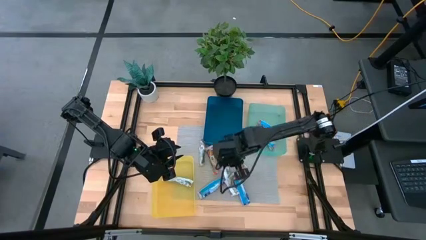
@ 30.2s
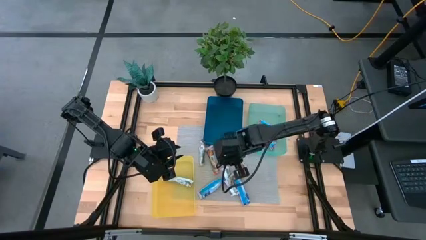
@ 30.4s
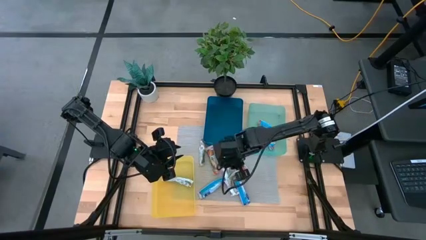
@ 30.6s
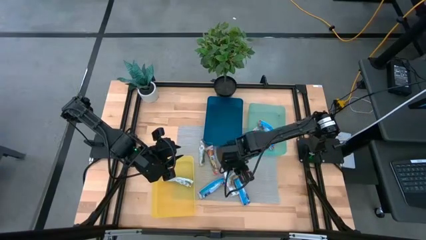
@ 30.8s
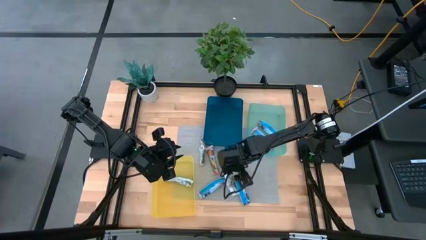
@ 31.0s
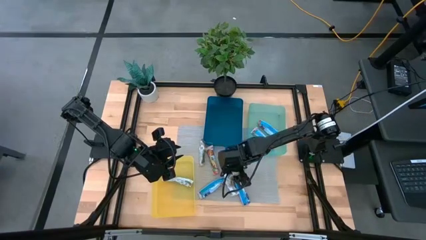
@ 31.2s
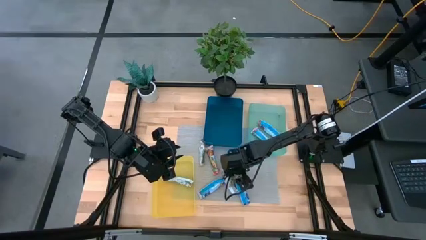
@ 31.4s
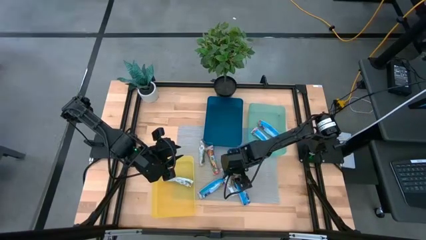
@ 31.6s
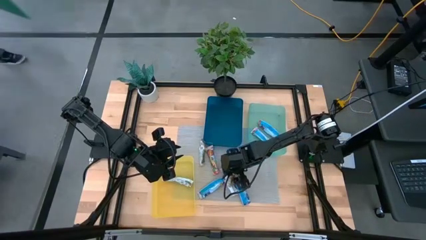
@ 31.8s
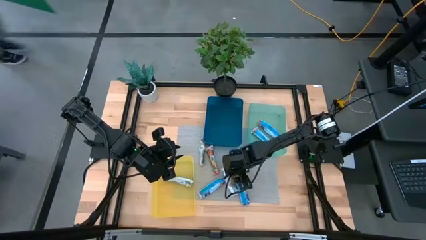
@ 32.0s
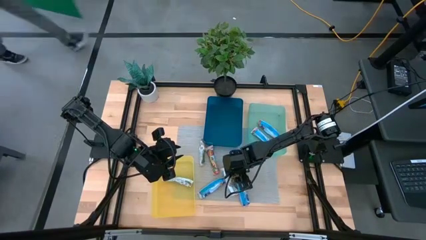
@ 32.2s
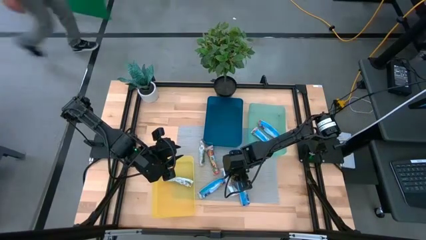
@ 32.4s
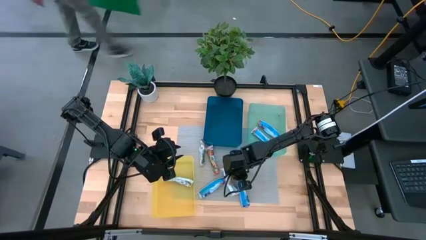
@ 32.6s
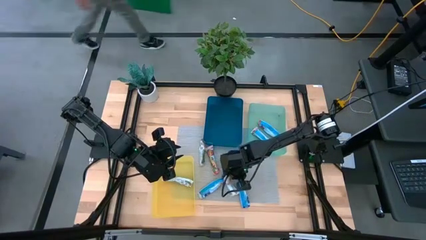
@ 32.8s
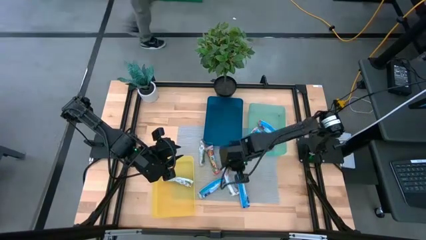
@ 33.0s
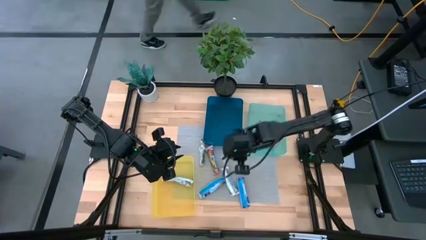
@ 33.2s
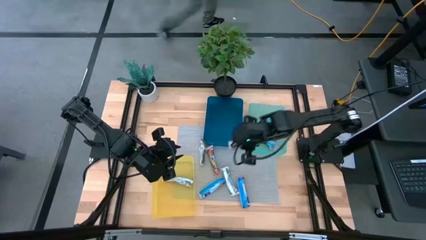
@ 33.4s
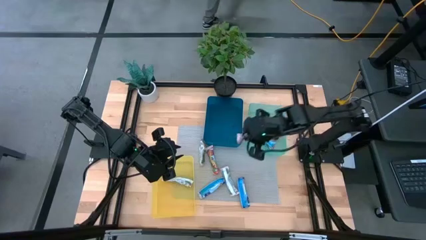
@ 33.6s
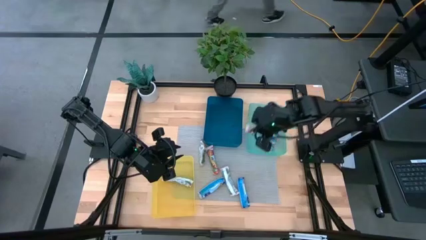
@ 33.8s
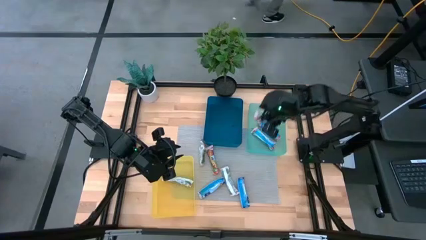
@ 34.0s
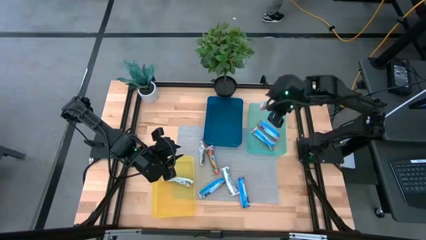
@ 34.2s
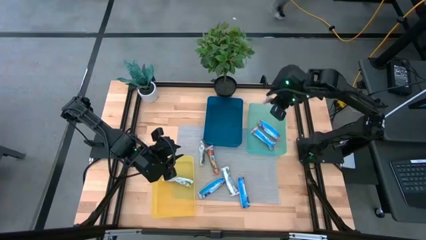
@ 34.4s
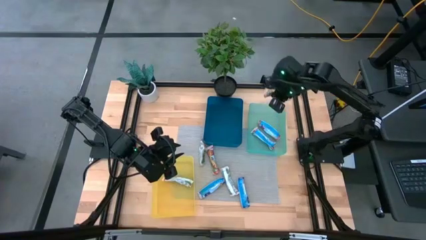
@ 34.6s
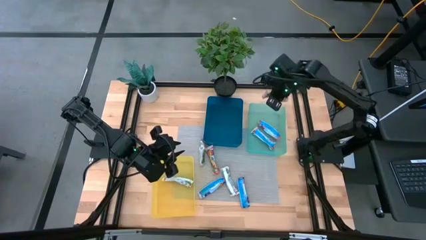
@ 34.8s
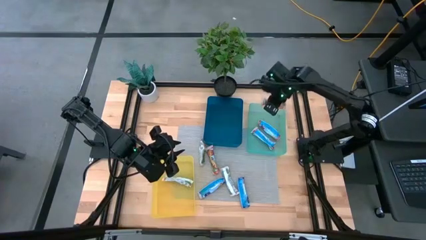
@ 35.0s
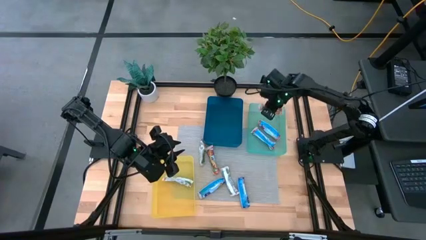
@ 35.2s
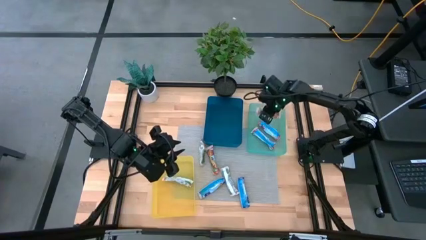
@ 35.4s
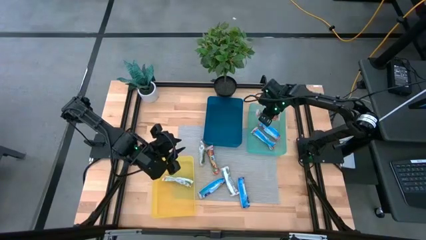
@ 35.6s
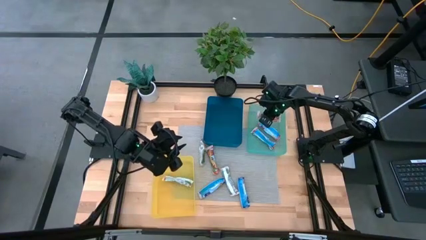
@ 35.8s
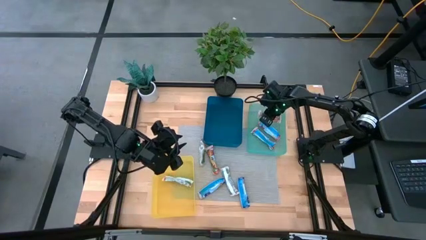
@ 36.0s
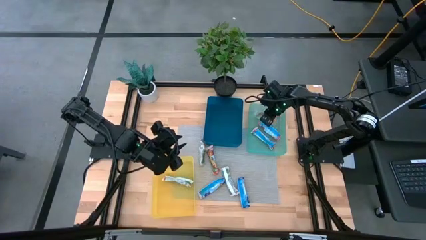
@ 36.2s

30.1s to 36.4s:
Task: Pick and place Granola Bars by type
Put the red granola bar into the green bin

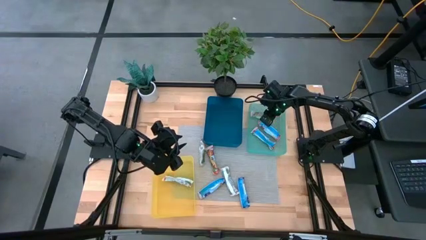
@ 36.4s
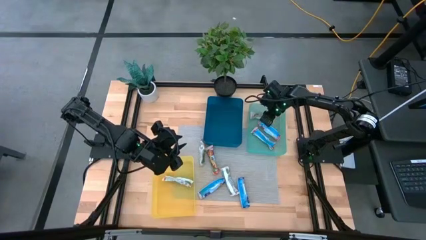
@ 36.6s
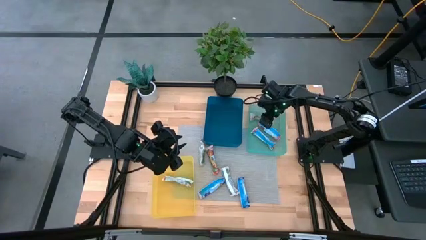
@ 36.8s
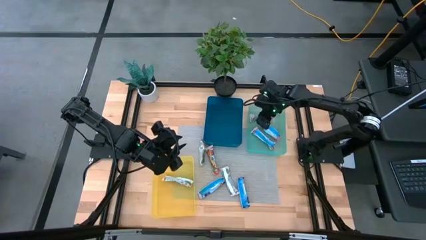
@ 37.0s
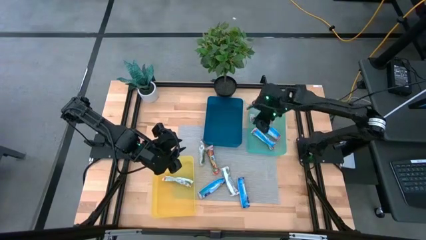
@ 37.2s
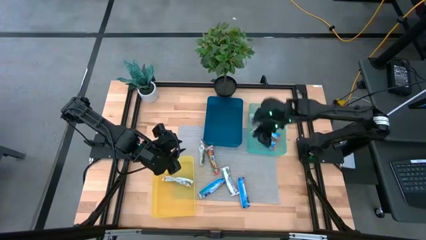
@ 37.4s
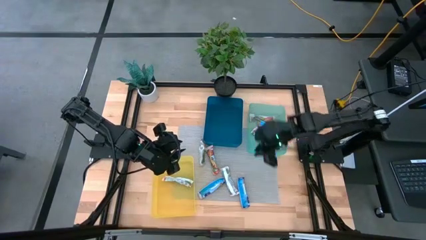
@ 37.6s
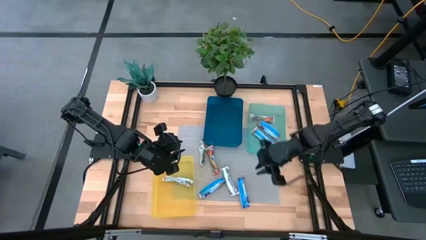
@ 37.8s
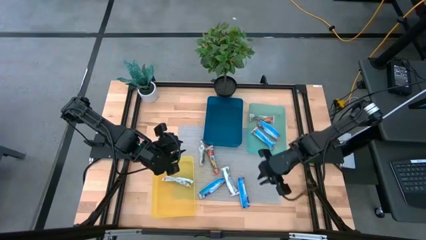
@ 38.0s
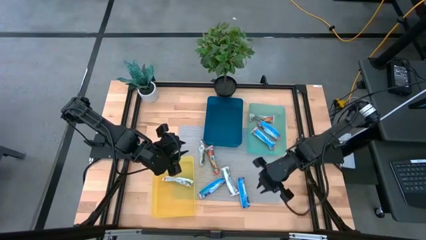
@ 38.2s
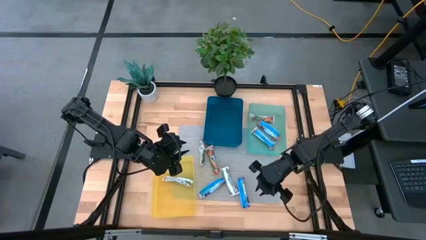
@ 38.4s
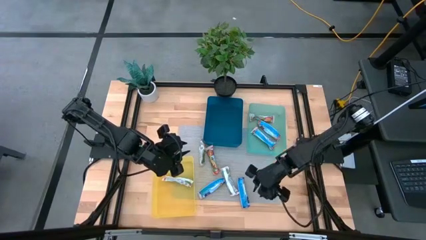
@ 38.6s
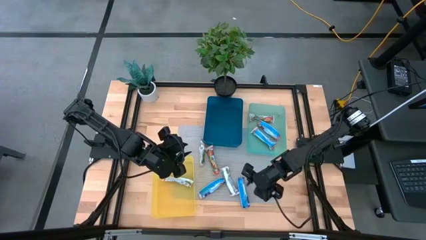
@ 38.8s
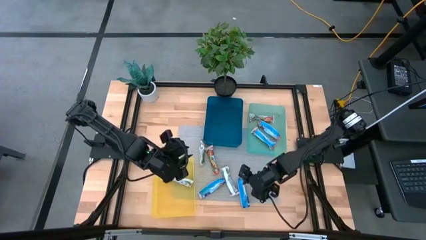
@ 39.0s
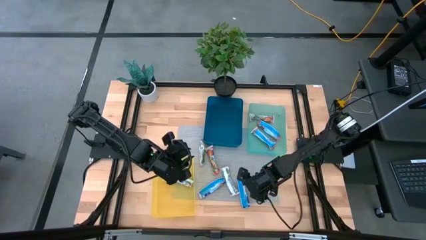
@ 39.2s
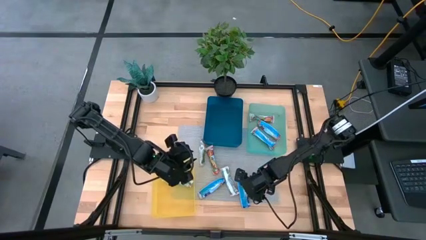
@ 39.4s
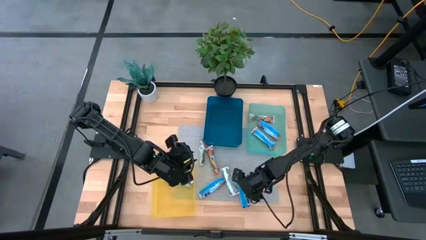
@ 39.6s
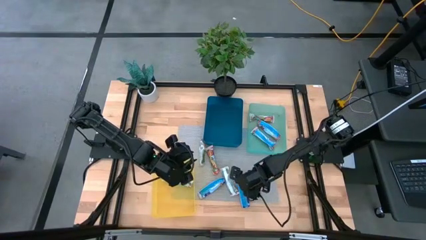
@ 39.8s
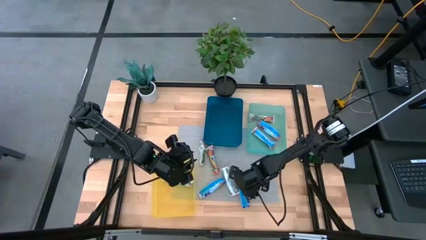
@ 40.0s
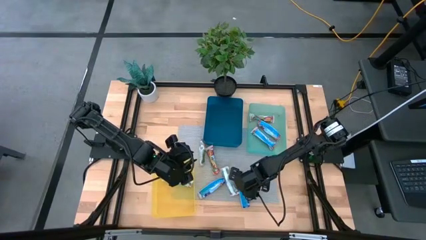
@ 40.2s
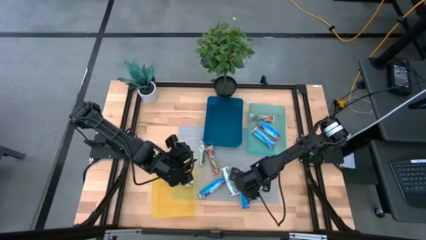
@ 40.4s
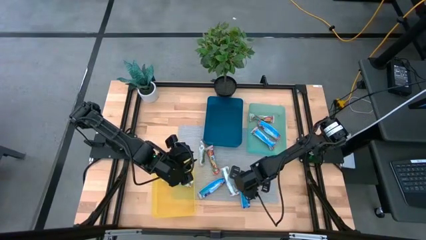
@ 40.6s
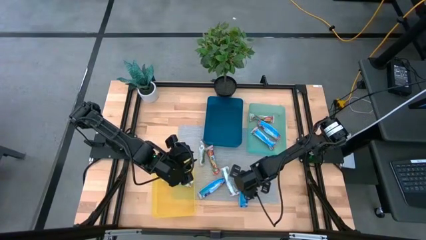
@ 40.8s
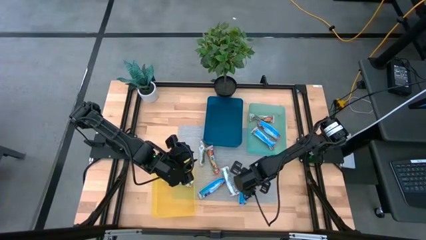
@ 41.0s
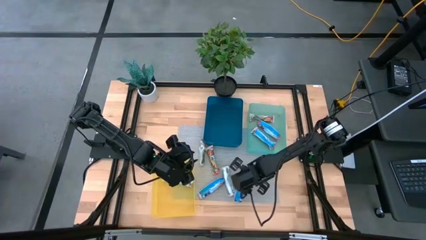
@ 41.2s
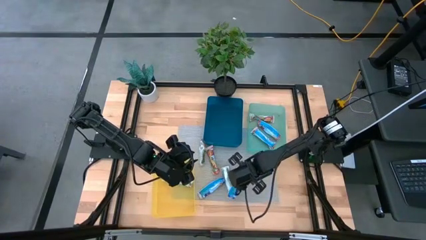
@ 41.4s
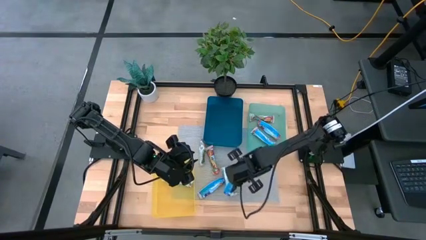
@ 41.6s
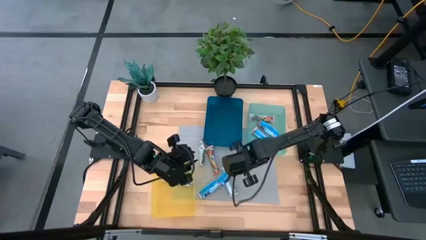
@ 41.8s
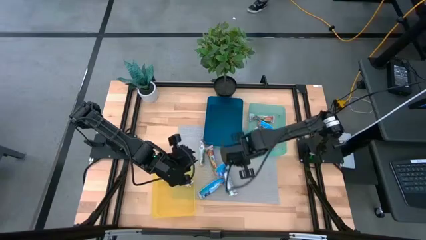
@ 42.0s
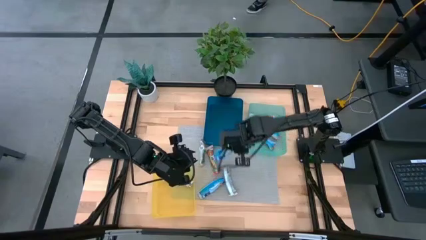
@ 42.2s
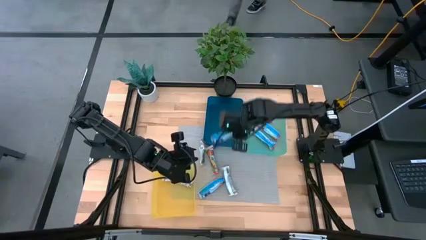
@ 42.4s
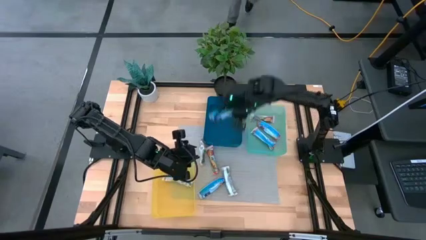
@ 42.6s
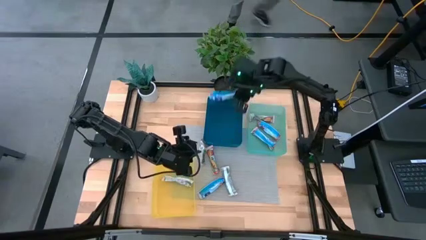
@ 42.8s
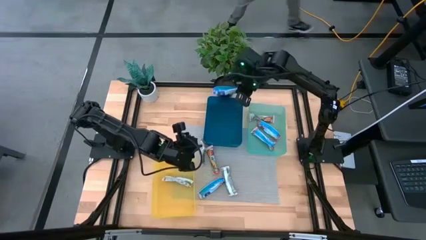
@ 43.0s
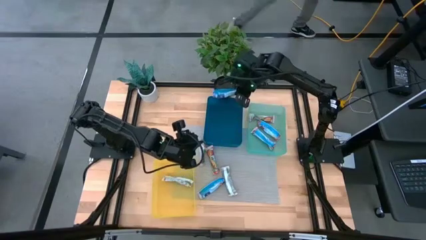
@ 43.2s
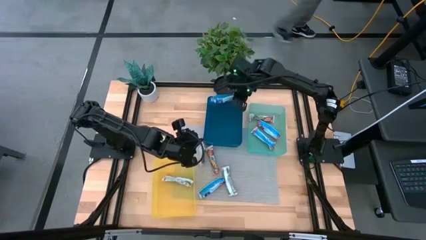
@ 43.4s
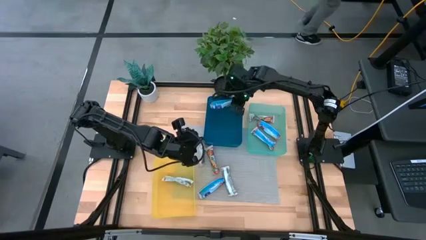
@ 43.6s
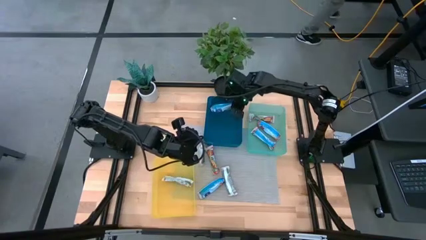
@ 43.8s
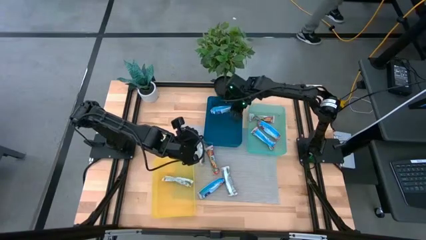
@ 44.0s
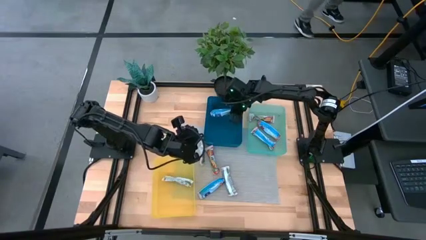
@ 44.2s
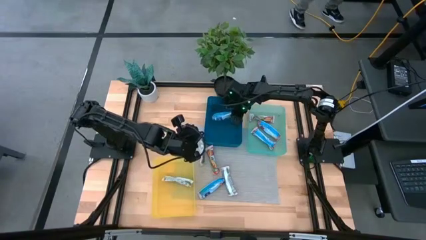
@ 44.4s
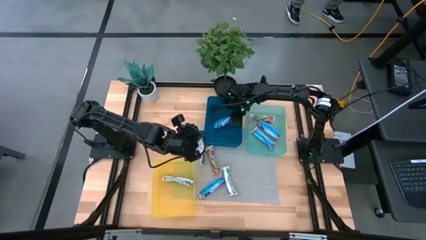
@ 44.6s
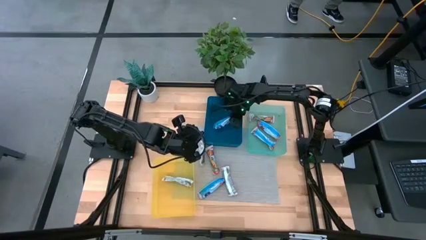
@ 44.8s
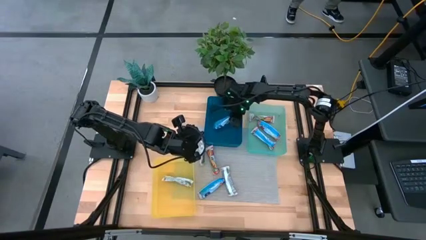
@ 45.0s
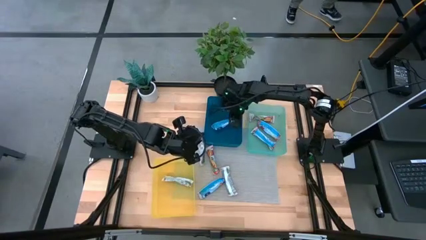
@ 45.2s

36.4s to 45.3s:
Put the blue granola bar into the blue bin
